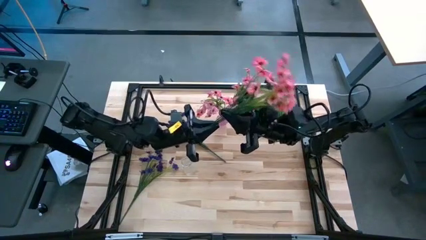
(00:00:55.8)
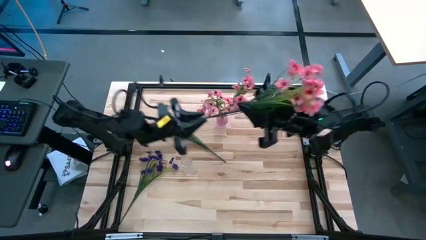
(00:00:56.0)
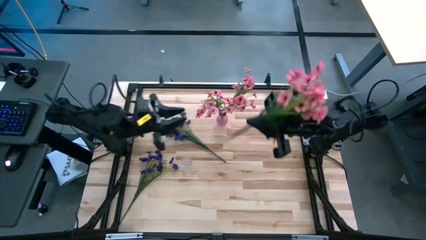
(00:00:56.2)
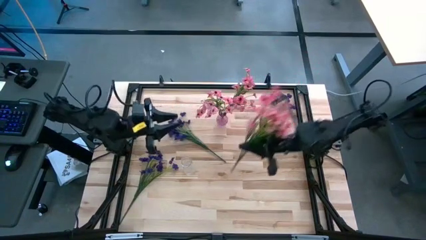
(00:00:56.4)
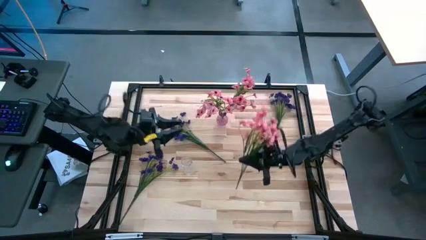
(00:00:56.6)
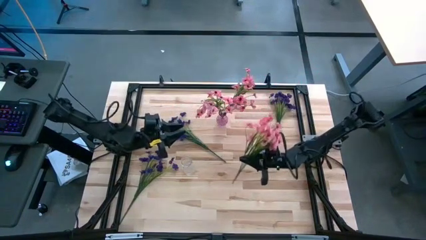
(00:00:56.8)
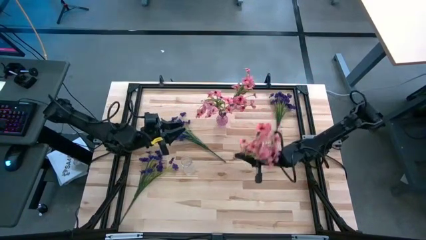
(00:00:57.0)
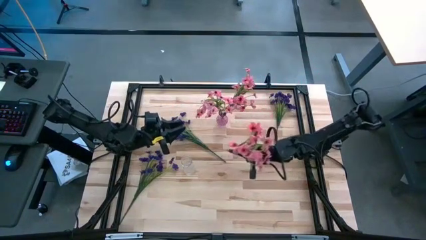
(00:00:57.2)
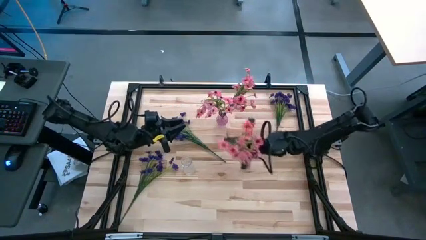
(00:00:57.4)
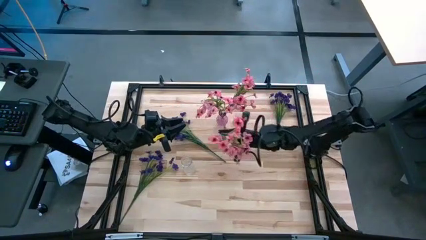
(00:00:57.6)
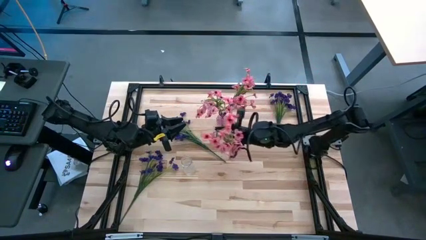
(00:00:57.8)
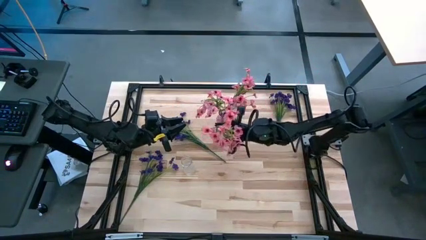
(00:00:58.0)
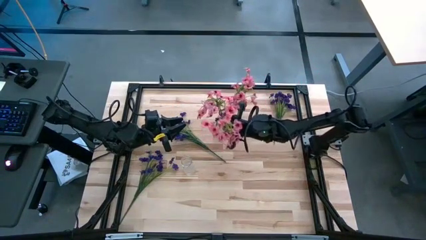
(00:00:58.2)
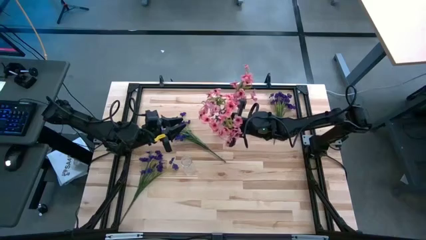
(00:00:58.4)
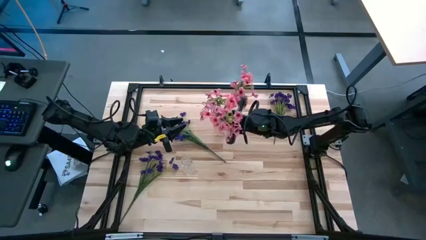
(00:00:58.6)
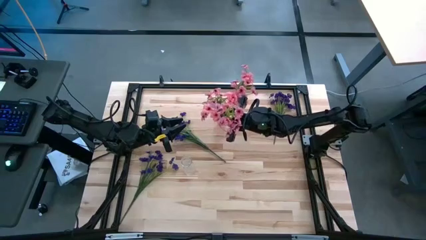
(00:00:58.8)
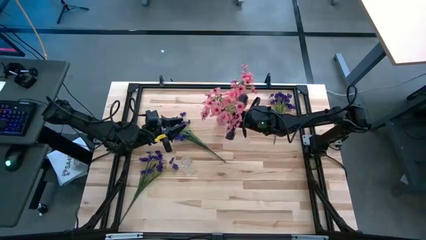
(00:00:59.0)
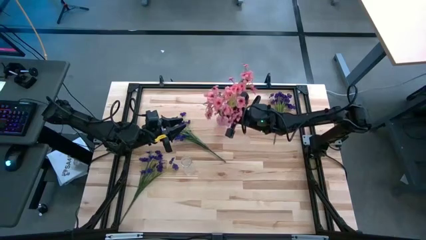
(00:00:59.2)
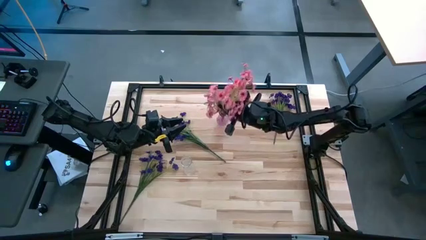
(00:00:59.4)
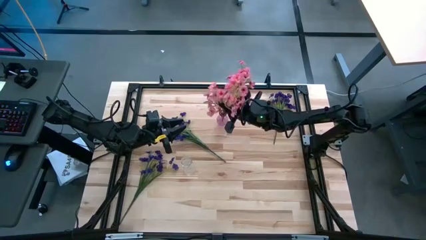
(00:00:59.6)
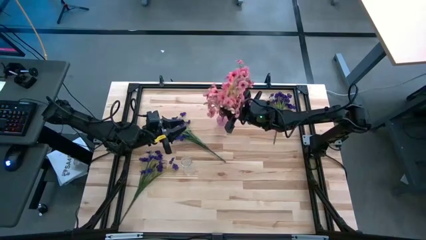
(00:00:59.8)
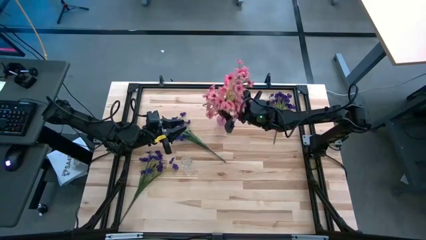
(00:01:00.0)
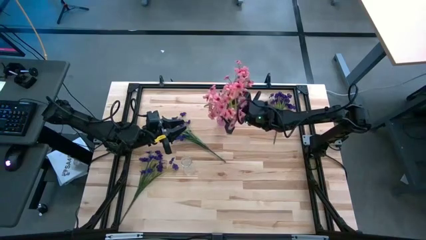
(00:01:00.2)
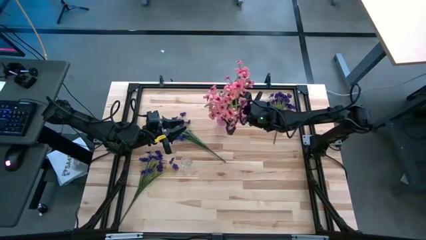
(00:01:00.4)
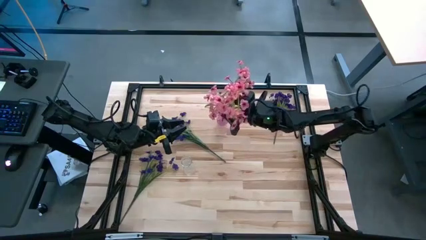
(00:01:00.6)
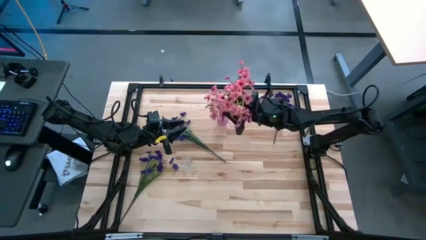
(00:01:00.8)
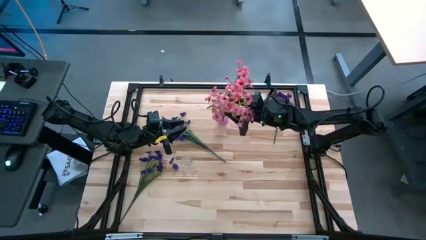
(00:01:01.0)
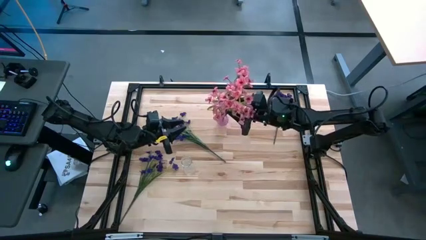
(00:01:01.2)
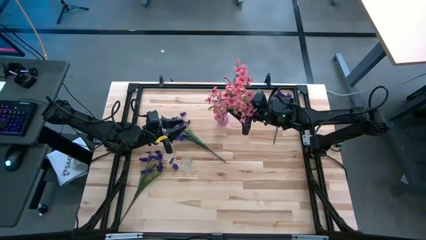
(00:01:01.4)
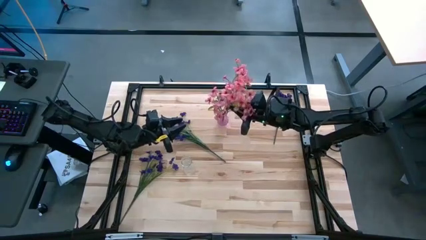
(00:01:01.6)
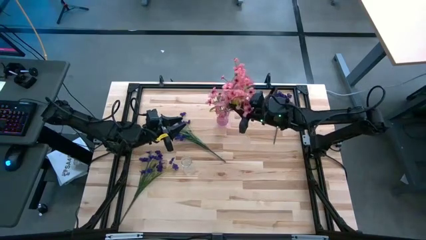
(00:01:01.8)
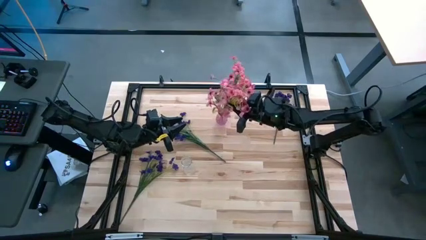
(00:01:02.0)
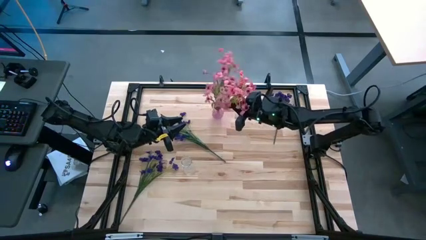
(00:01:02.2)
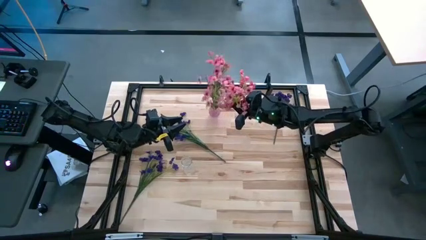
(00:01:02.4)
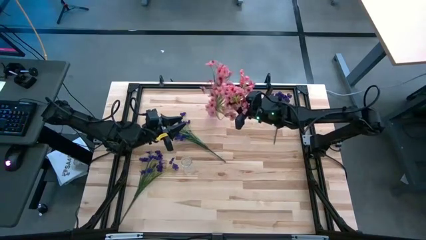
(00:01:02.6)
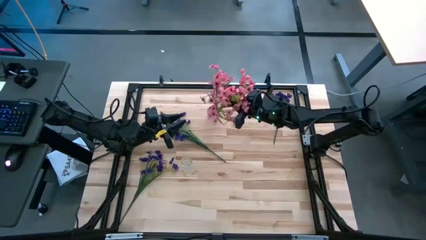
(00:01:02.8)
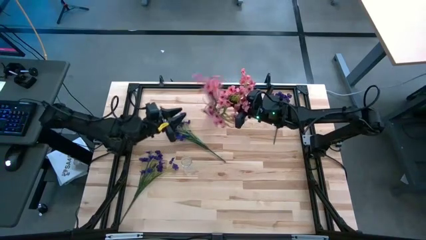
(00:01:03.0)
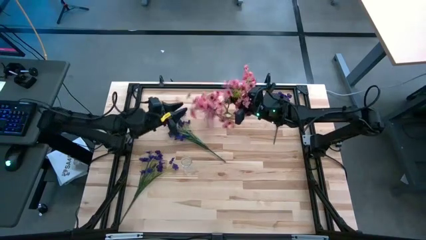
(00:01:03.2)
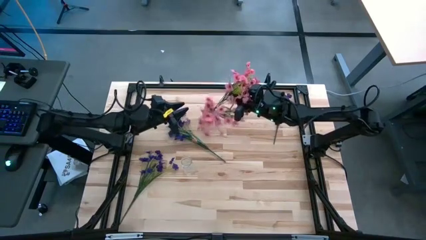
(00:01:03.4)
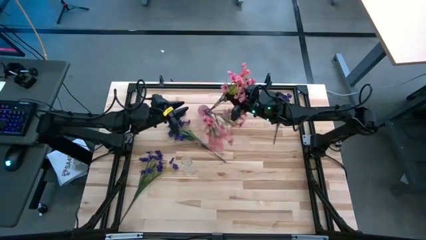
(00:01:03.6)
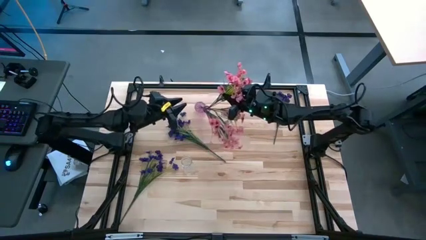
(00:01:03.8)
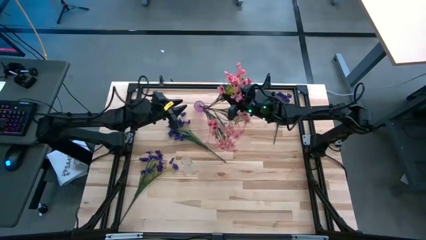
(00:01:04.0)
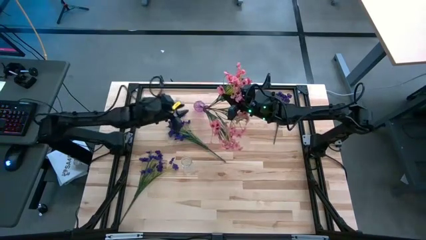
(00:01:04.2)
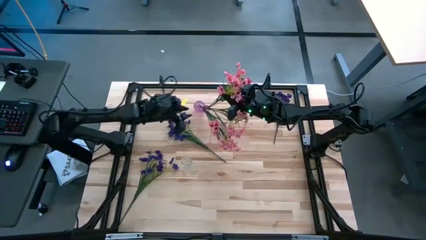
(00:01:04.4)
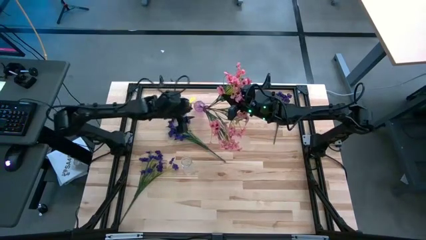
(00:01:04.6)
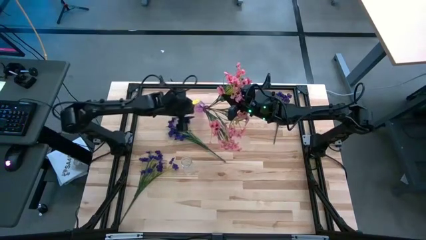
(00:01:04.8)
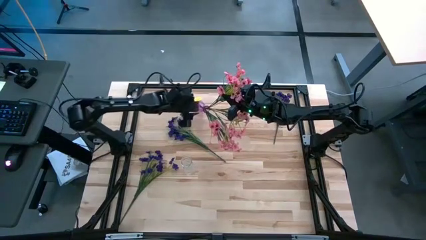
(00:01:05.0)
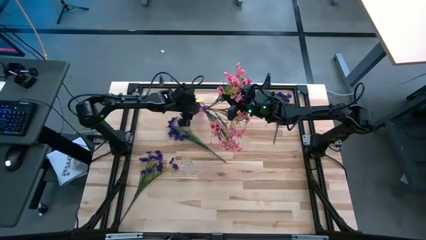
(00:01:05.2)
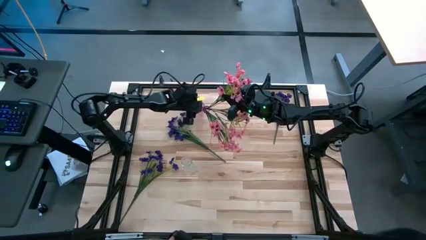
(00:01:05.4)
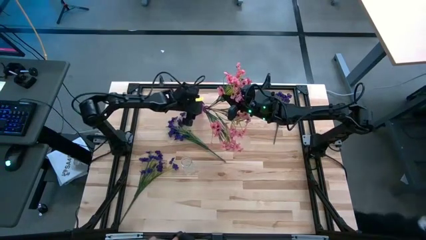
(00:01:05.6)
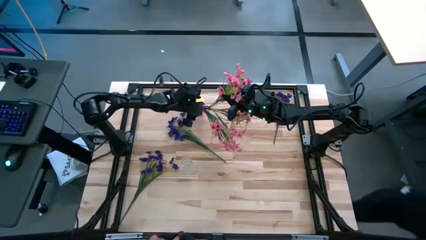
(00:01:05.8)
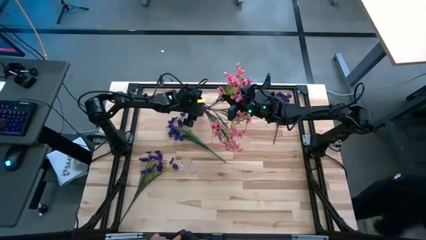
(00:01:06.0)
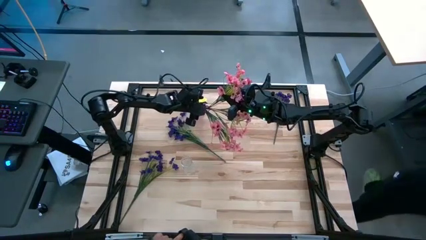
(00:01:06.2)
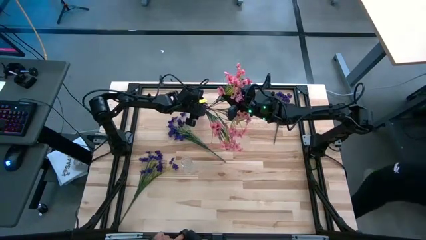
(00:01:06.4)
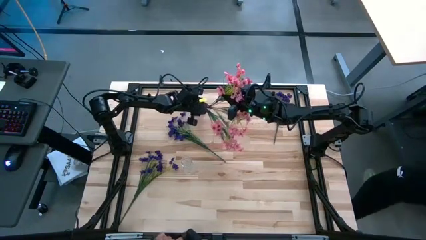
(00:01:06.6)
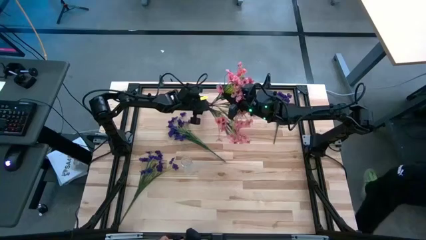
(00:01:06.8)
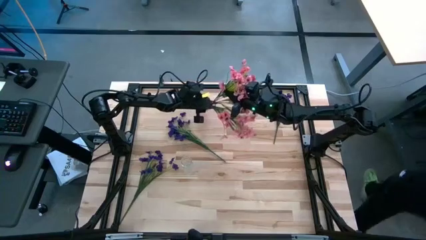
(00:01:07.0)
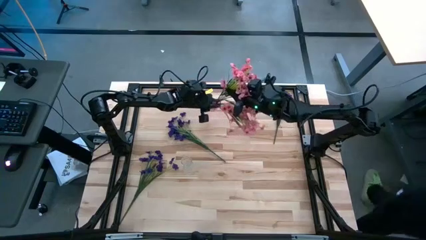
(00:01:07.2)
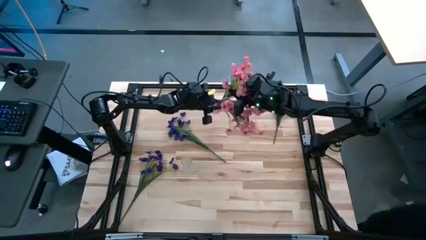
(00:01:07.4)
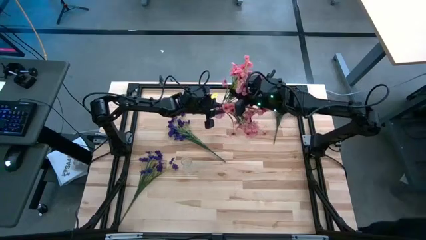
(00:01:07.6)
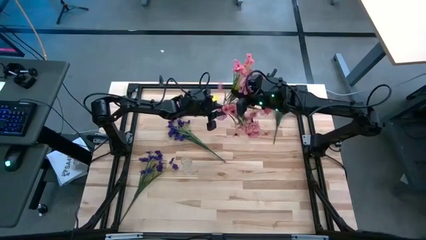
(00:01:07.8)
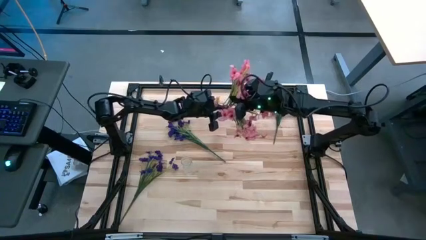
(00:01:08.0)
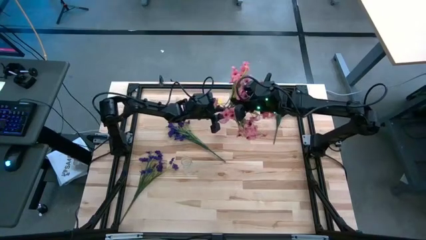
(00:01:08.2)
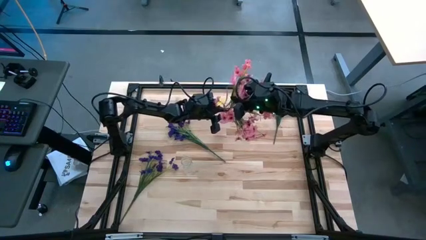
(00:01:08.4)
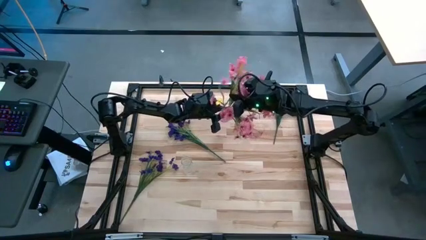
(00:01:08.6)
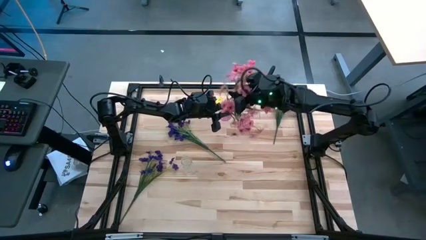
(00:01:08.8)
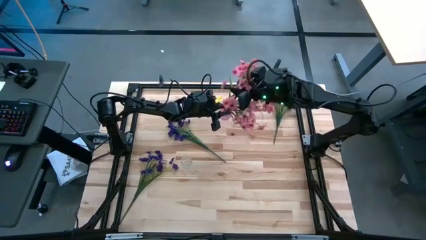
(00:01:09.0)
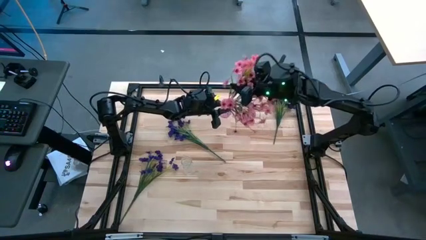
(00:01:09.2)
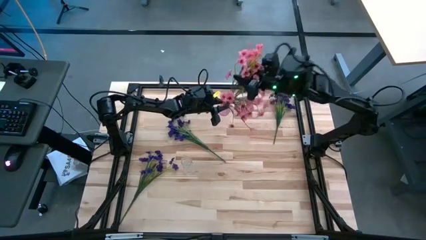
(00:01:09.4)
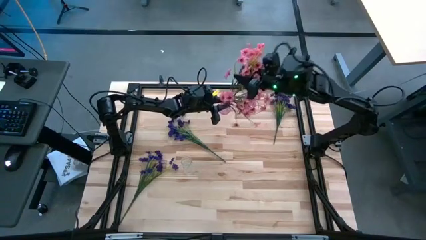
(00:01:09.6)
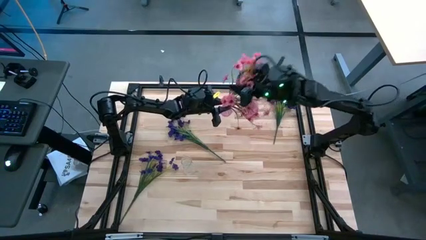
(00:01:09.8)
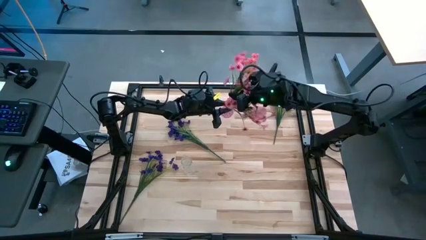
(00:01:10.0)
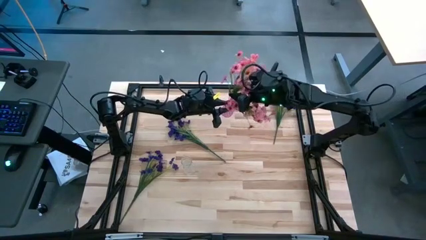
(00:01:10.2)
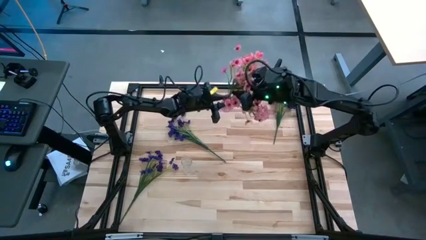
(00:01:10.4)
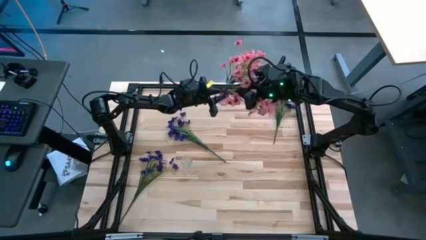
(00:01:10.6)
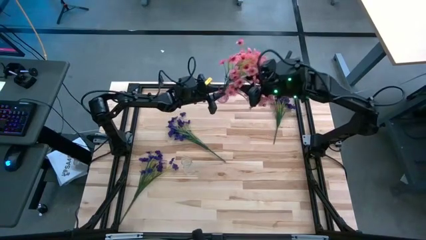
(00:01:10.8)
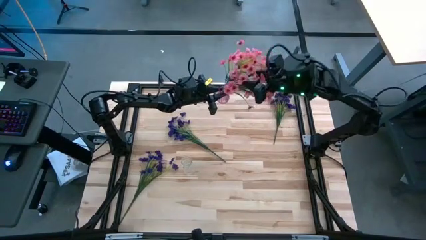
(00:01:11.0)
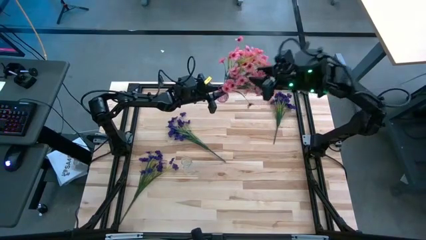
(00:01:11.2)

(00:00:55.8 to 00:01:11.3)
Task: Sort flowers into vase by color
Put the pink flowers into the purple vase
